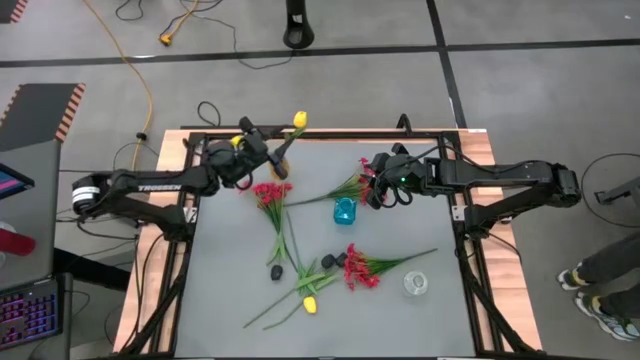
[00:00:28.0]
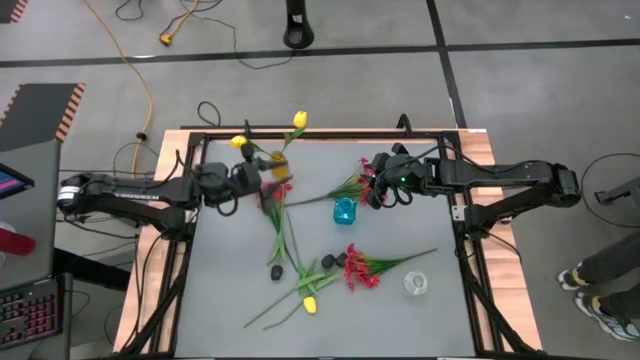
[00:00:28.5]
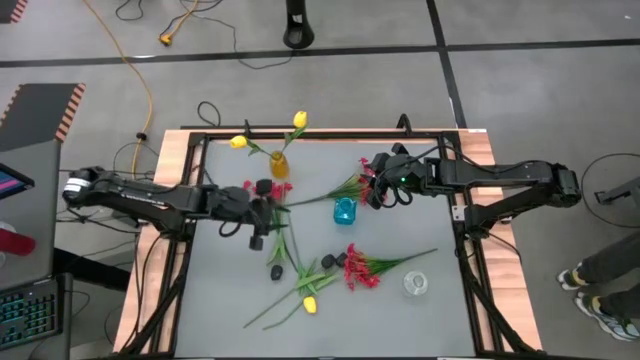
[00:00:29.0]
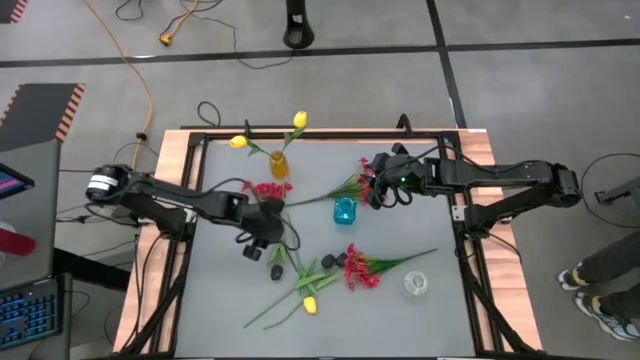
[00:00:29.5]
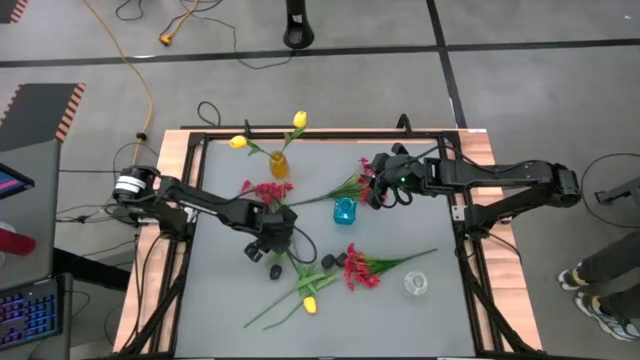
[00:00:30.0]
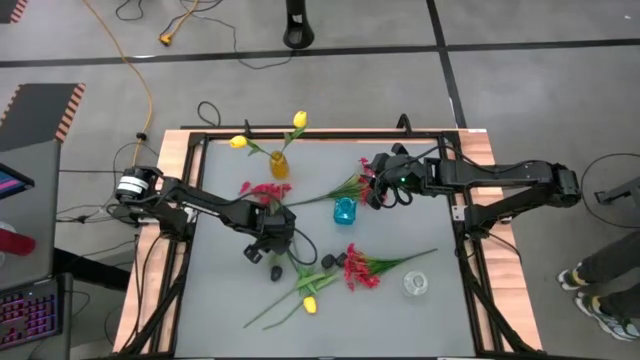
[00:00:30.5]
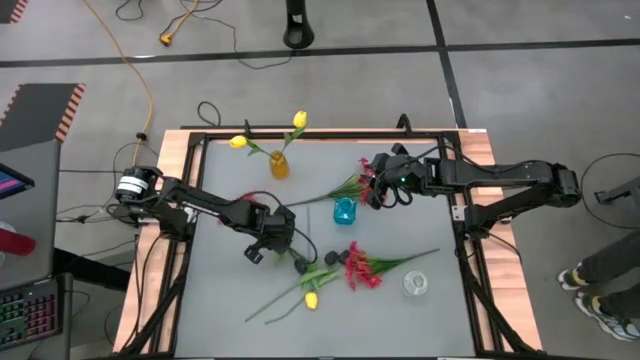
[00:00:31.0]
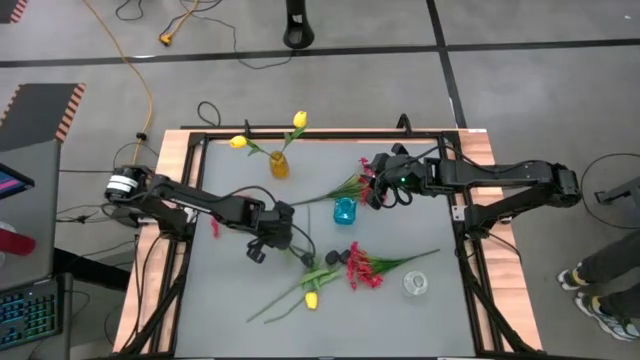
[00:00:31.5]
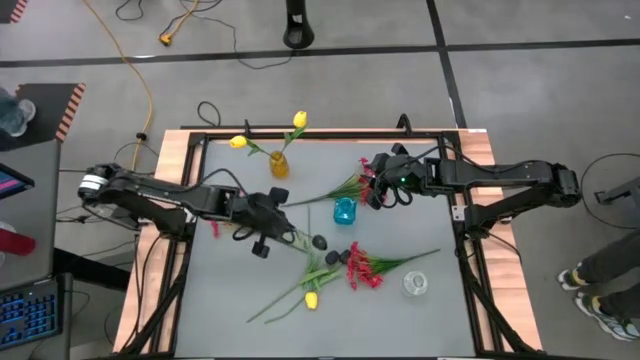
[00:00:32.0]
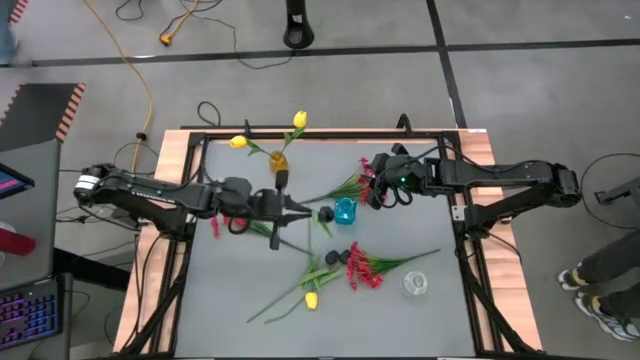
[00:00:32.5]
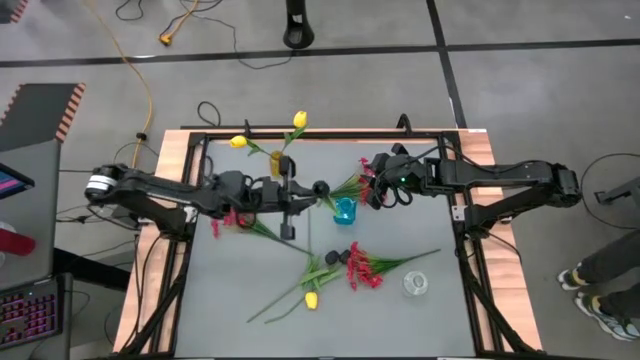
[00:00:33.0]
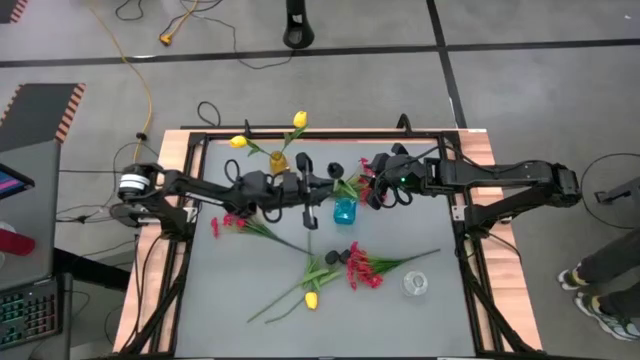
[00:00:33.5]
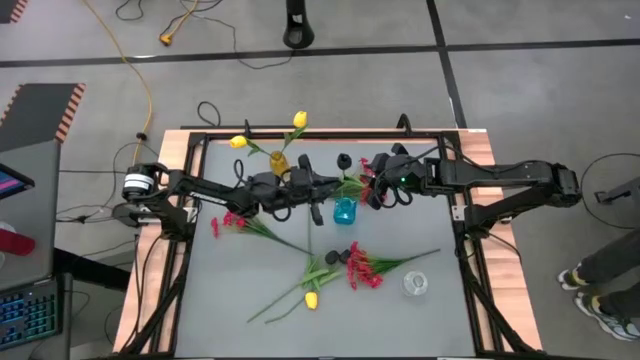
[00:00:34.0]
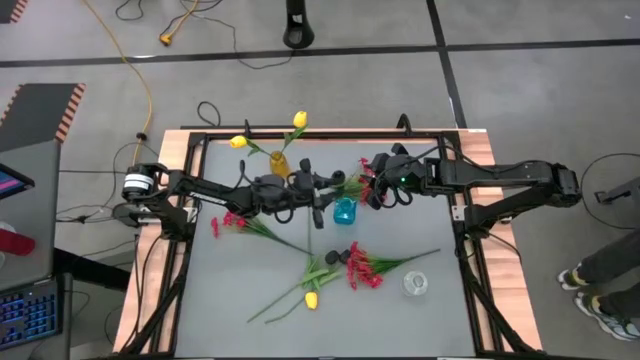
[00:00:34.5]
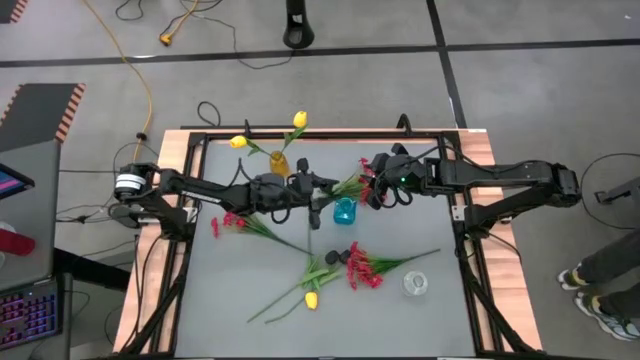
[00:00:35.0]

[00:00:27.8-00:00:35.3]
Task: Sort flowers into vase by color
Put the left black flower into the blue vase

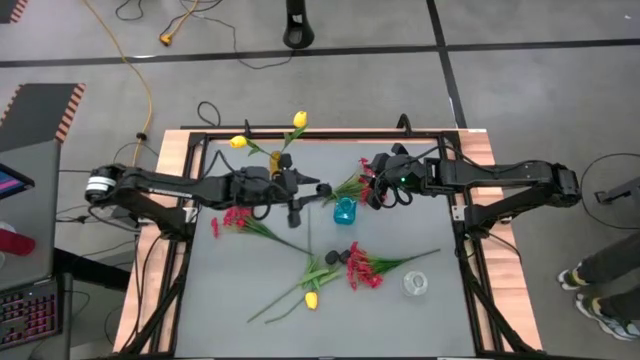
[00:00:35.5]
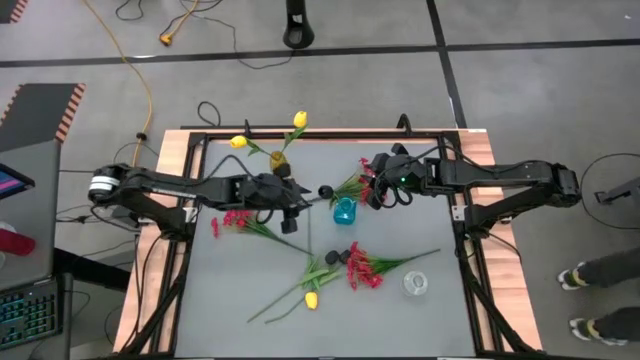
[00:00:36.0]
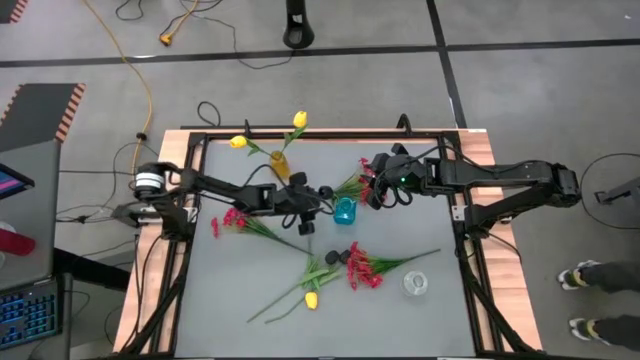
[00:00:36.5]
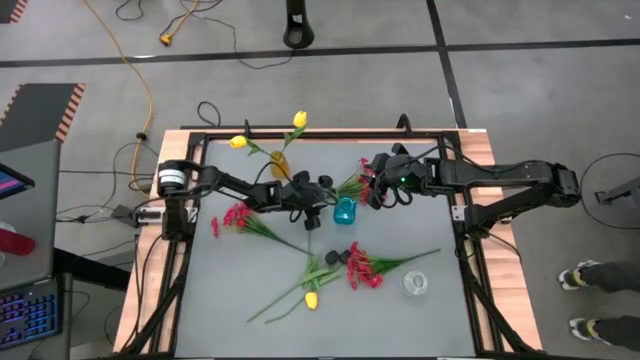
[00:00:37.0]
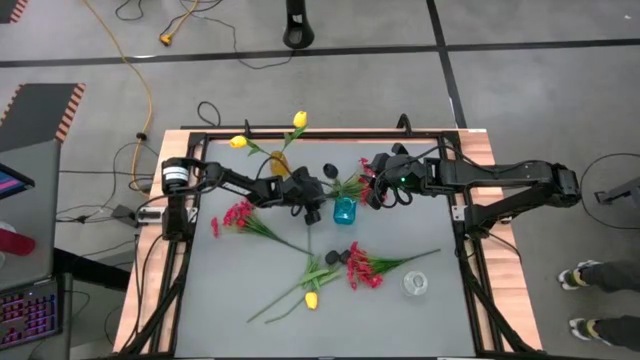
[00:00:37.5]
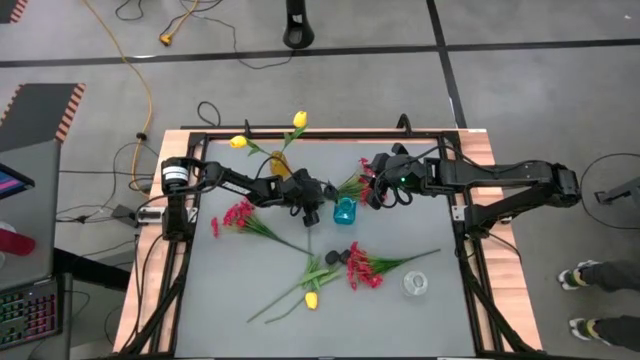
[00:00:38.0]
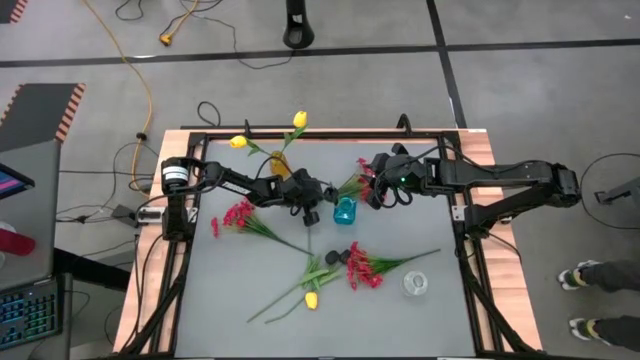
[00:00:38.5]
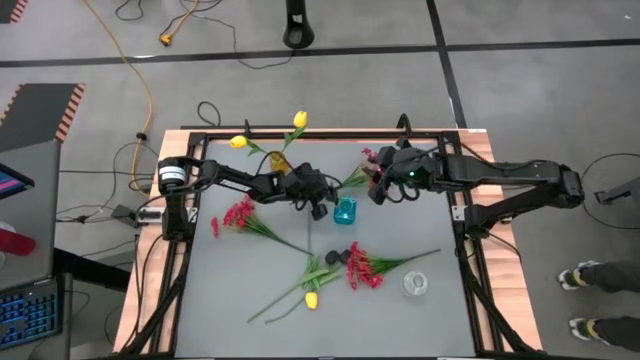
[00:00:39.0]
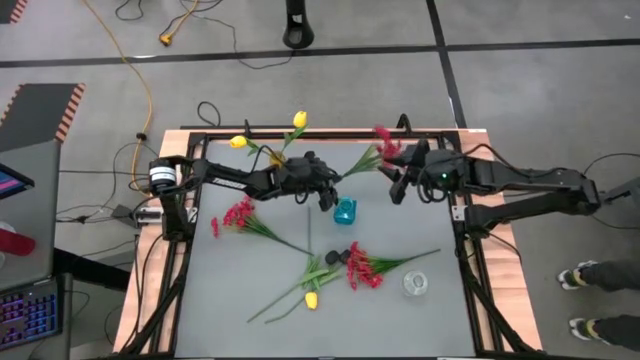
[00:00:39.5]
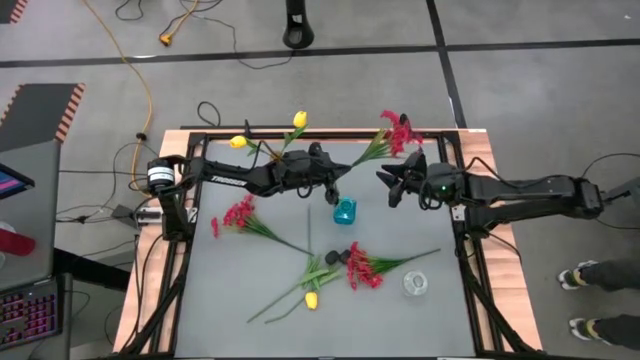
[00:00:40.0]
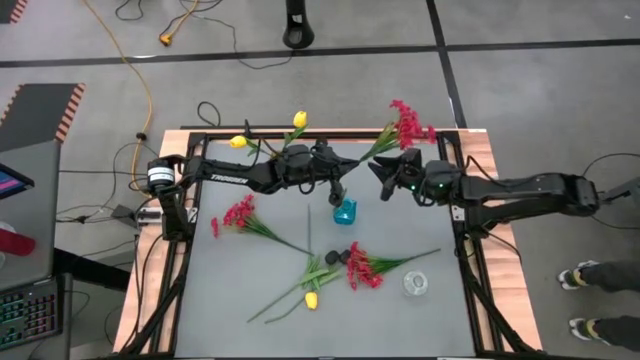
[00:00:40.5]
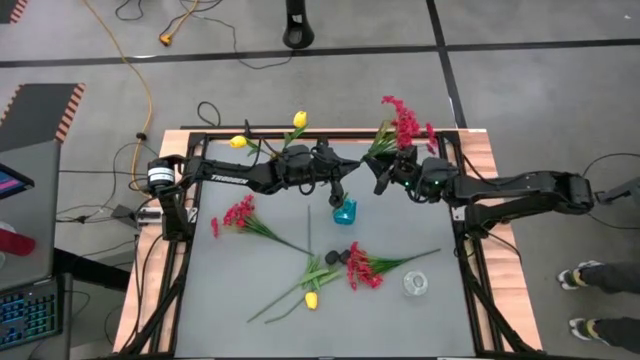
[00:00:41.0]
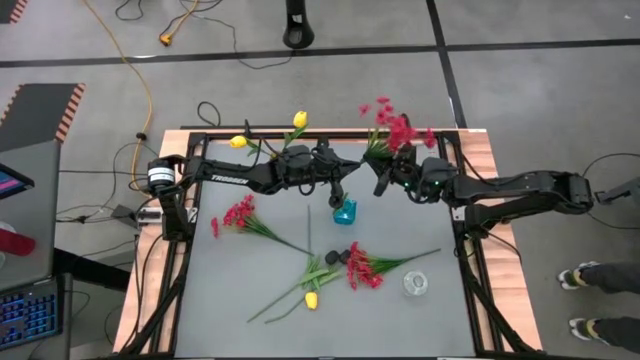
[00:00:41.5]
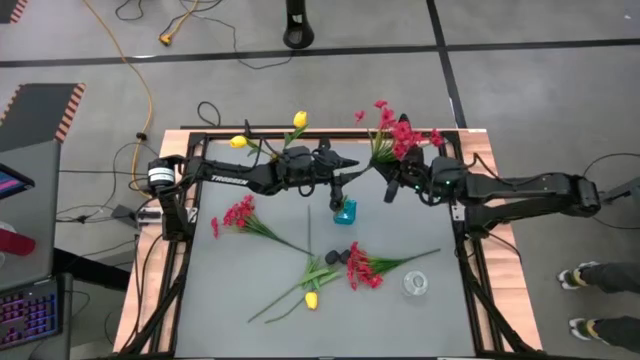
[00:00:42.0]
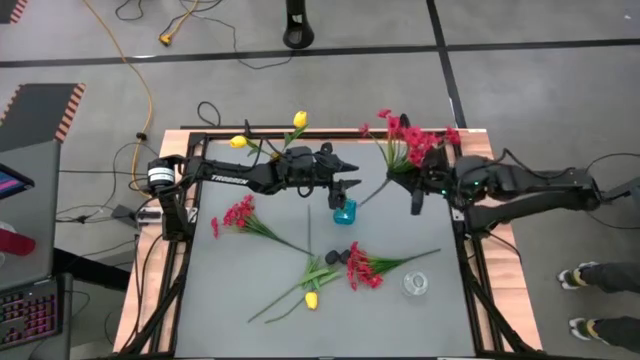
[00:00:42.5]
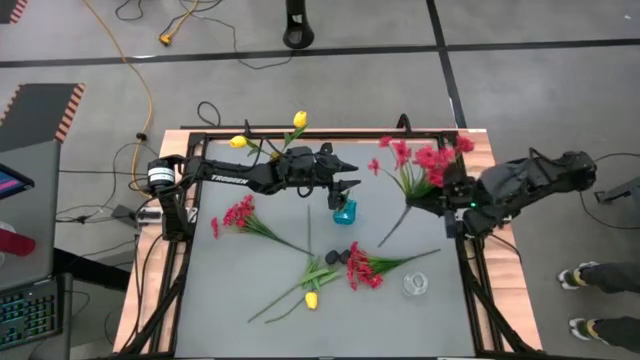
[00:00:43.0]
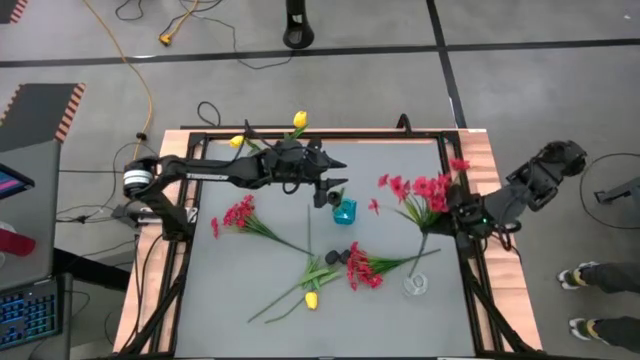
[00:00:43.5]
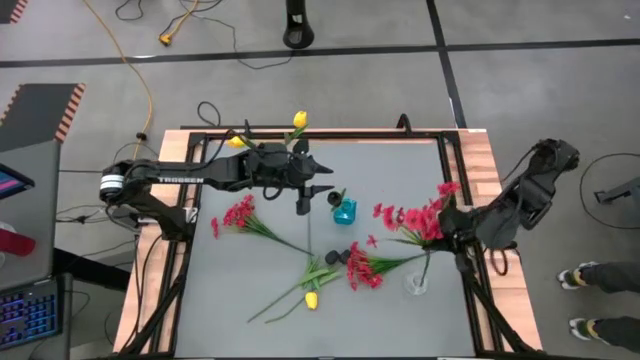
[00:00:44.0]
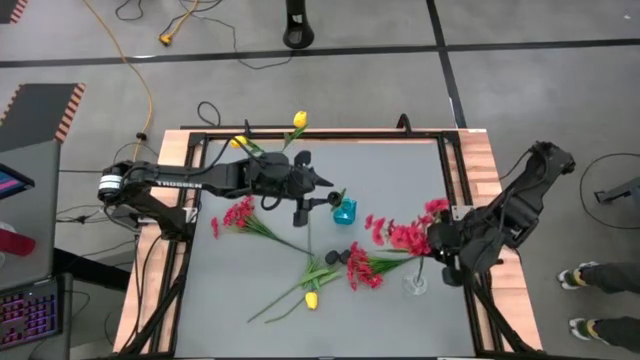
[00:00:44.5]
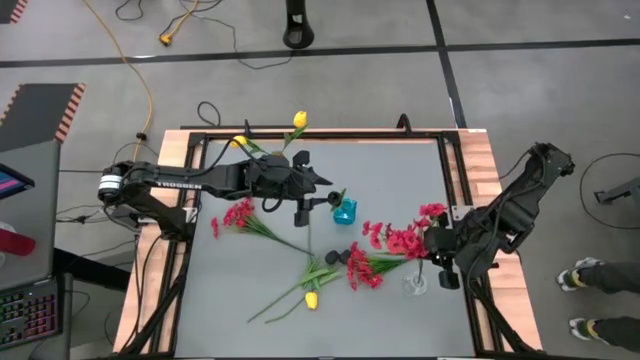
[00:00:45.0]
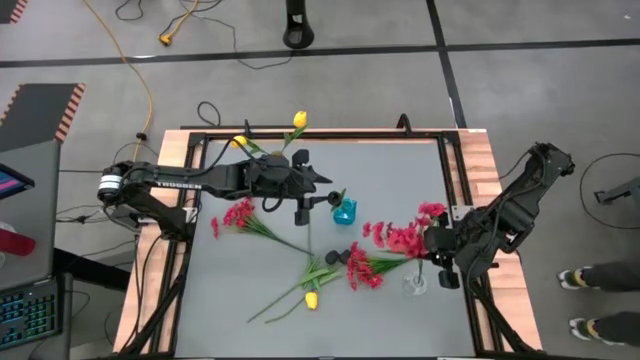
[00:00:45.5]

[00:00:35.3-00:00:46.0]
Put the top red flowers into the transparent vase

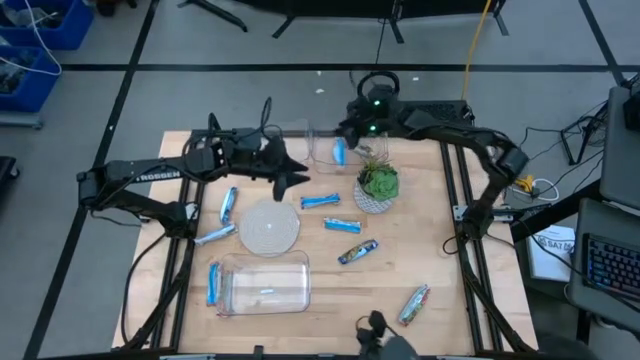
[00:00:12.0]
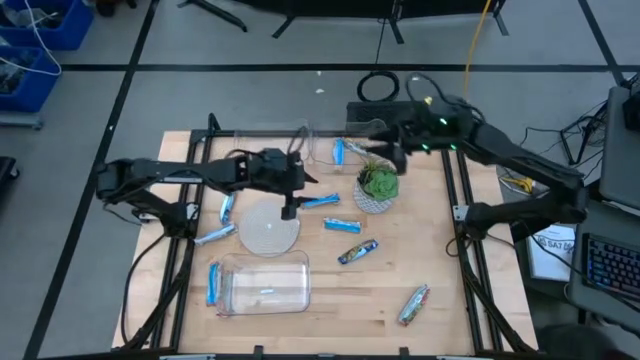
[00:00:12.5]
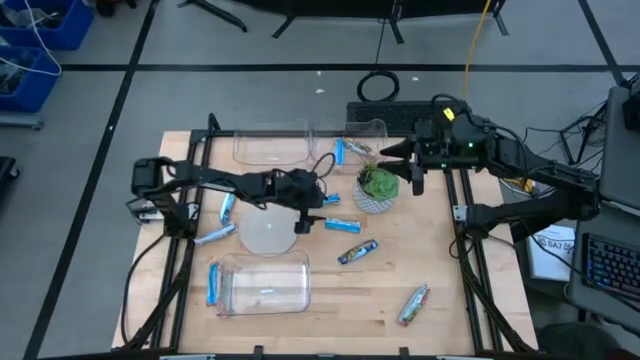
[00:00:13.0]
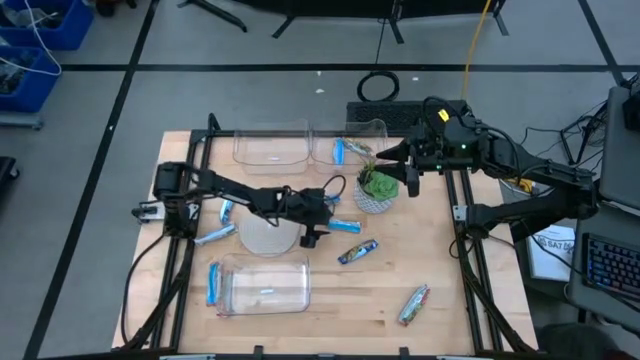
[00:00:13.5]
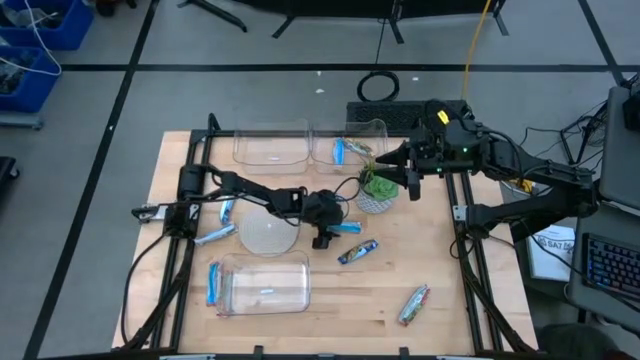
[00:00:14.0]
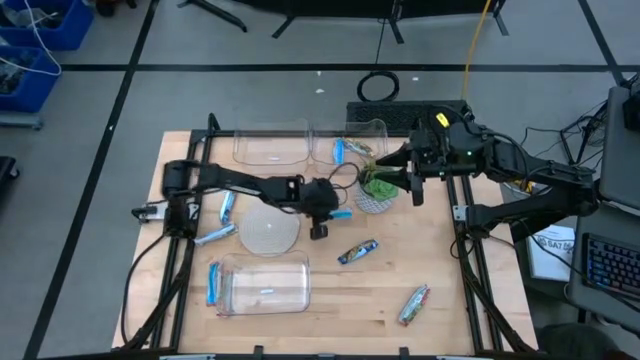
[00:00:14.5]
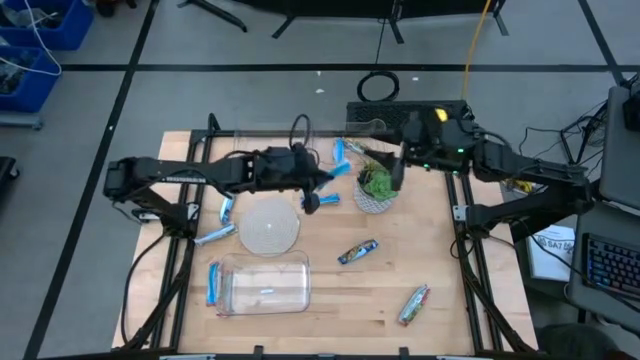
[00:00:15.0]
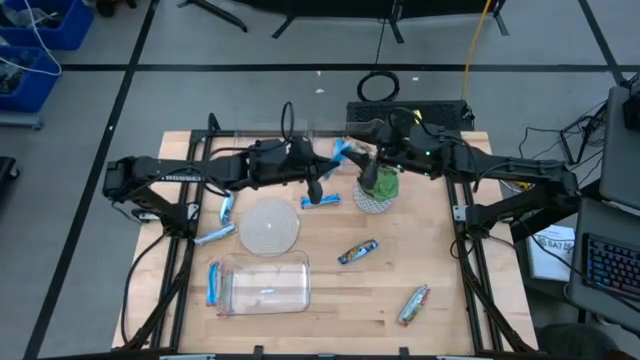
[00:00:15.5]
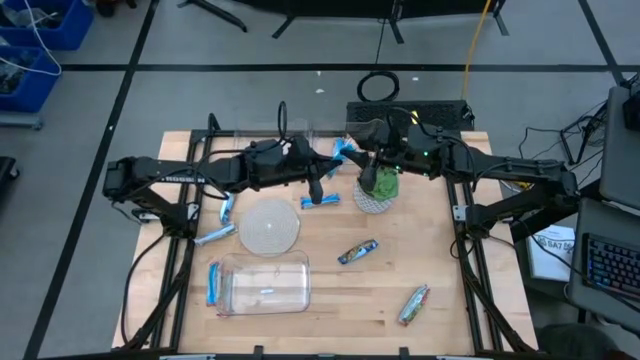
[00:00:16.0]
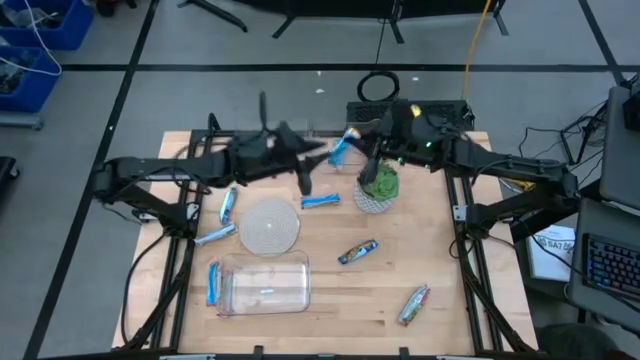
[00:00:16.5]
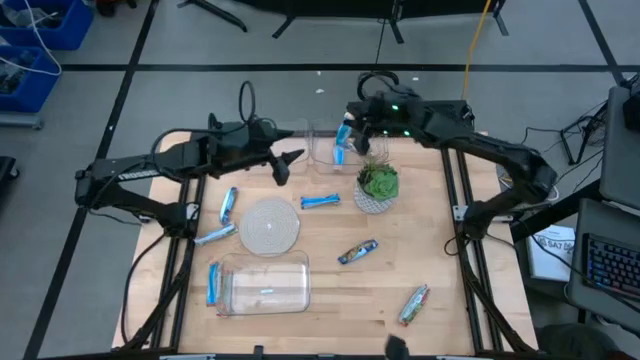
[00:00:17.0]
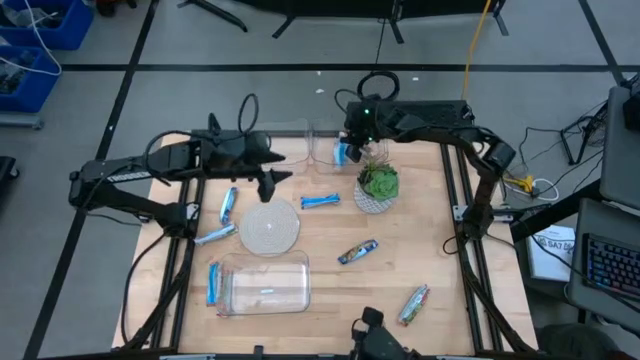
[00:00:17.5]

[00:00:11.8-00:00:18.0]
Task: Pick and place Granola Bars by type
Put the yellow granola bar into the top right transparent bin
